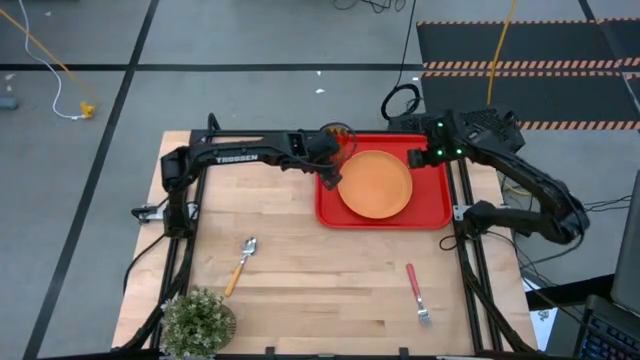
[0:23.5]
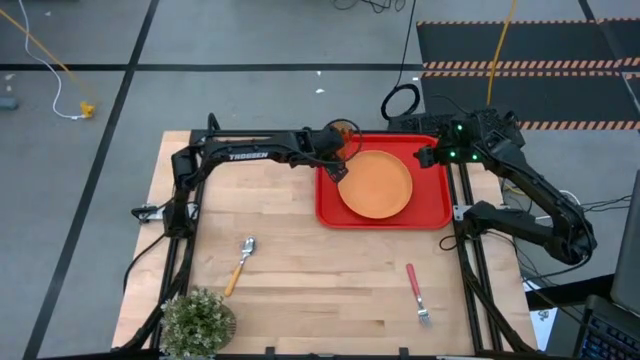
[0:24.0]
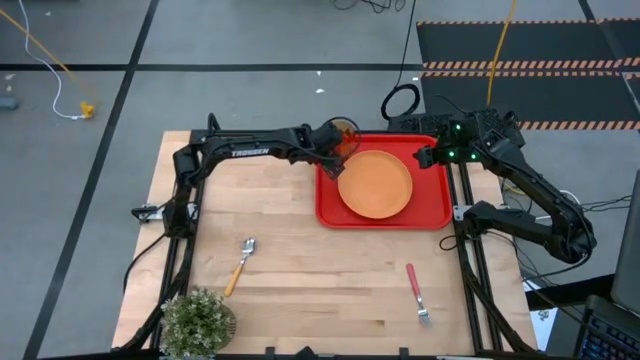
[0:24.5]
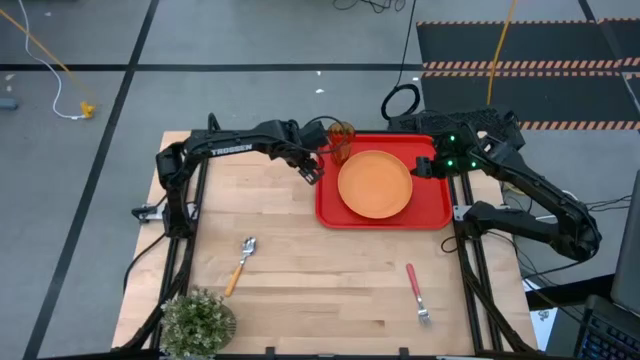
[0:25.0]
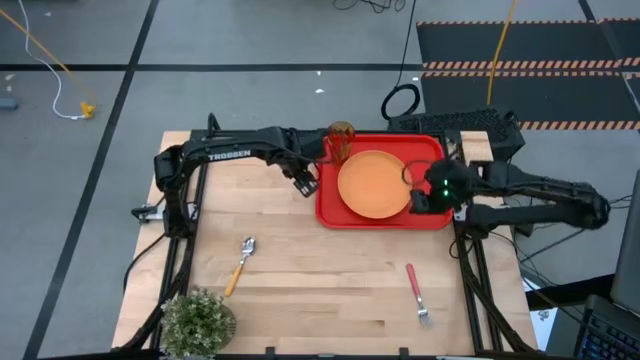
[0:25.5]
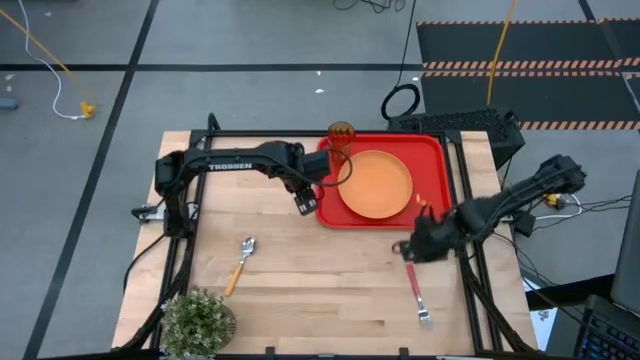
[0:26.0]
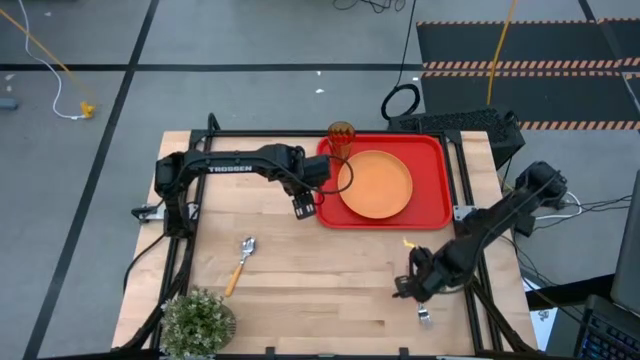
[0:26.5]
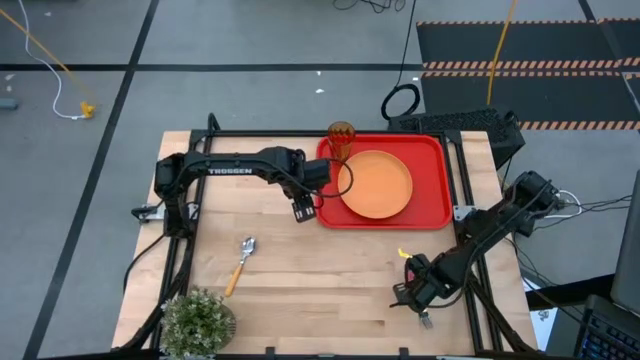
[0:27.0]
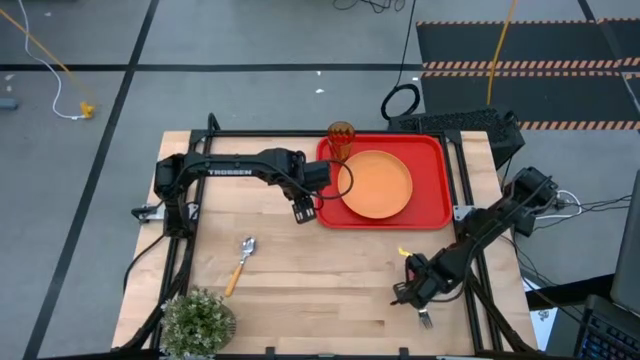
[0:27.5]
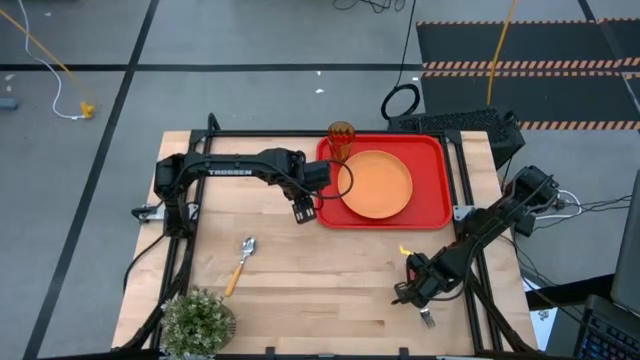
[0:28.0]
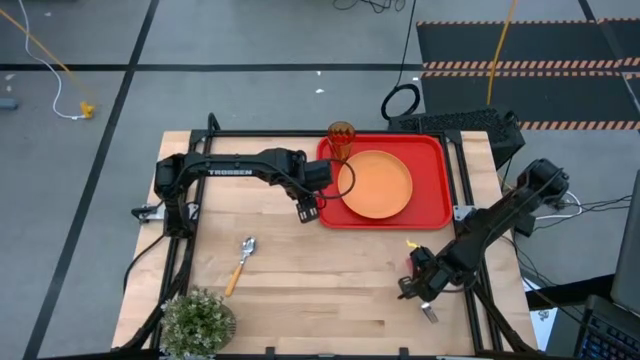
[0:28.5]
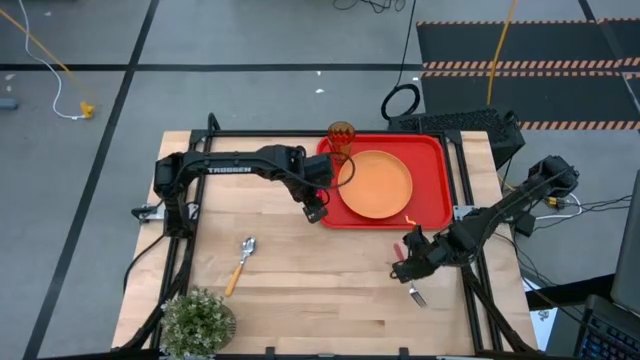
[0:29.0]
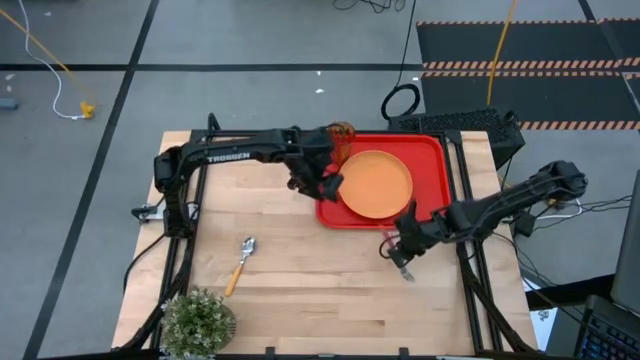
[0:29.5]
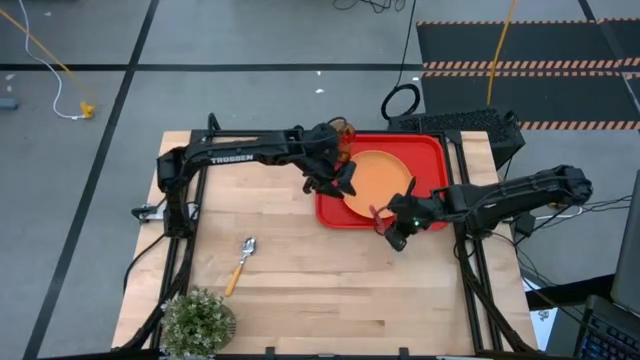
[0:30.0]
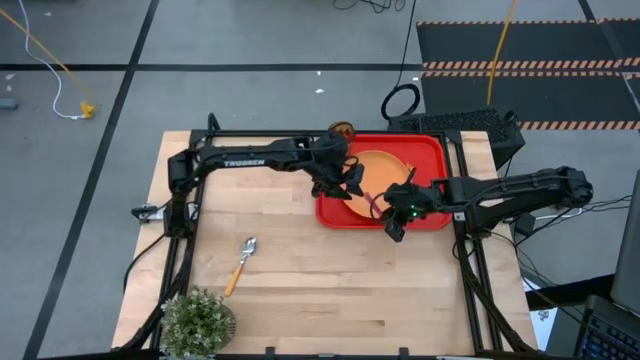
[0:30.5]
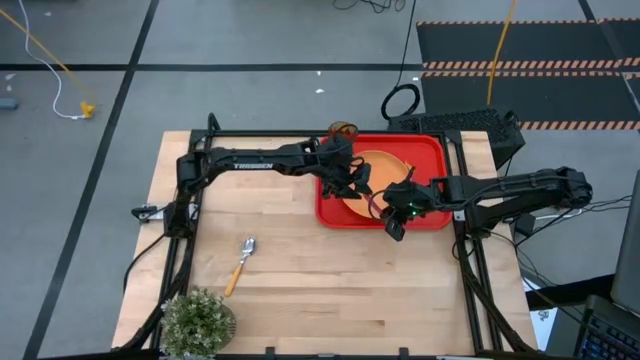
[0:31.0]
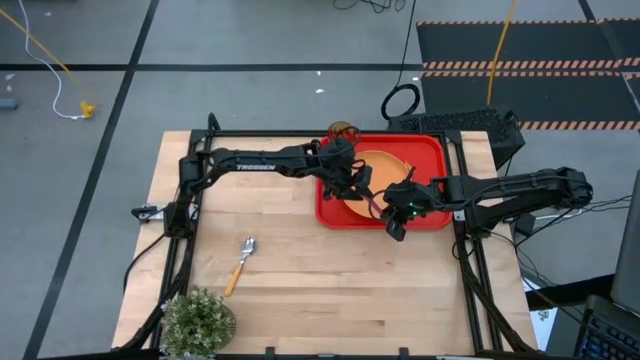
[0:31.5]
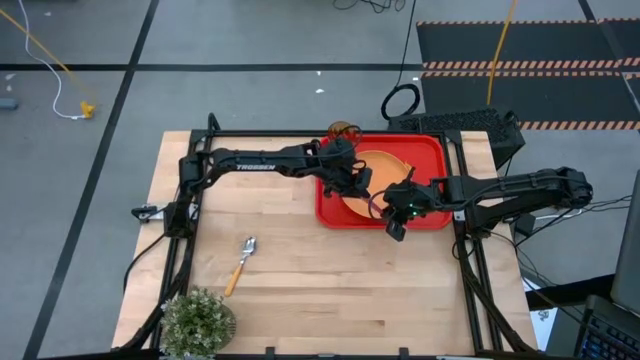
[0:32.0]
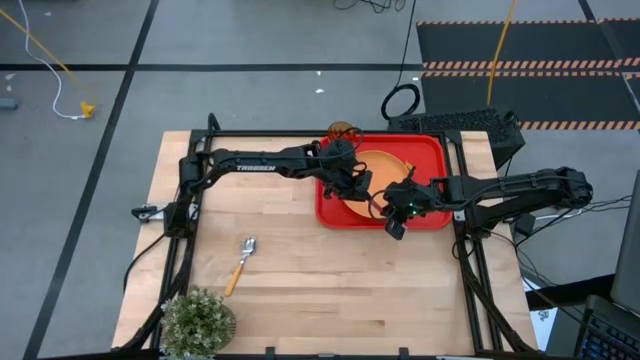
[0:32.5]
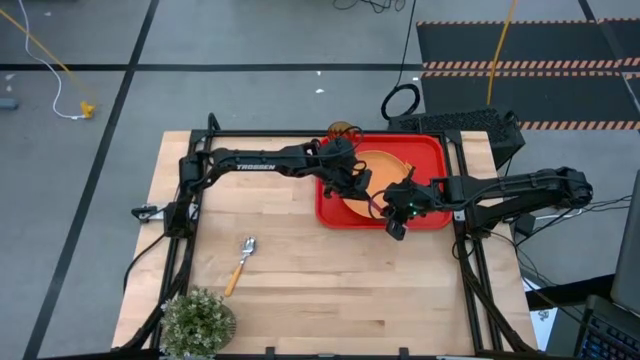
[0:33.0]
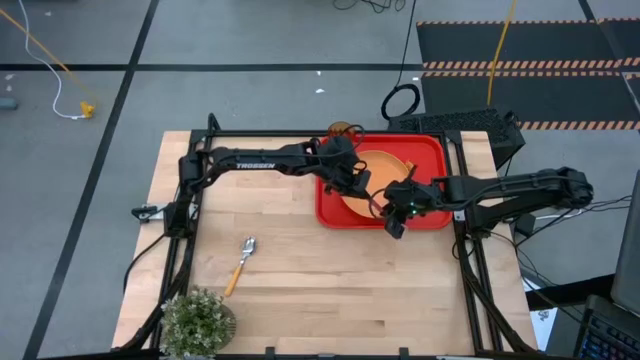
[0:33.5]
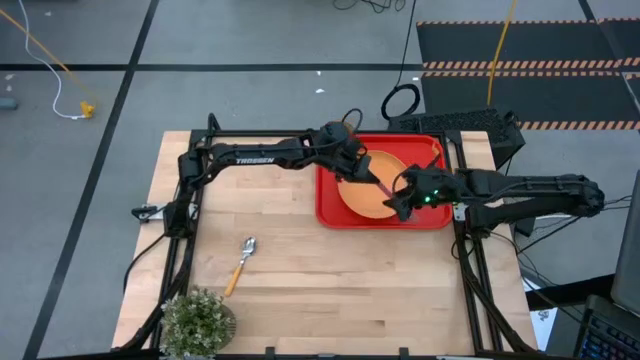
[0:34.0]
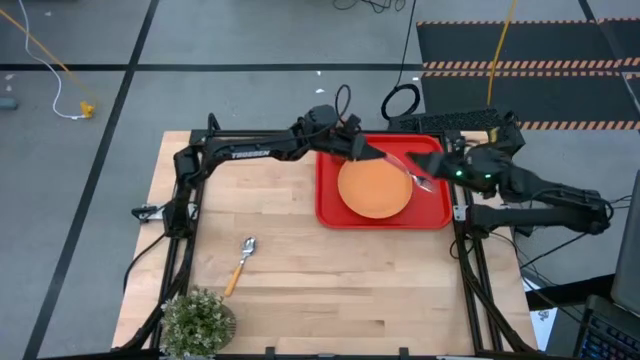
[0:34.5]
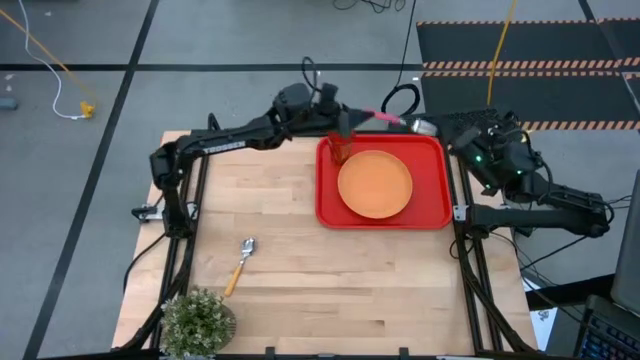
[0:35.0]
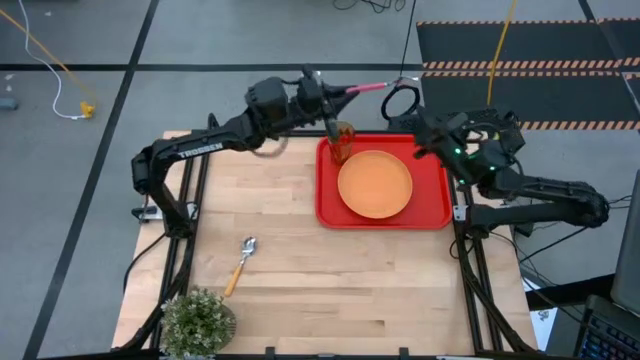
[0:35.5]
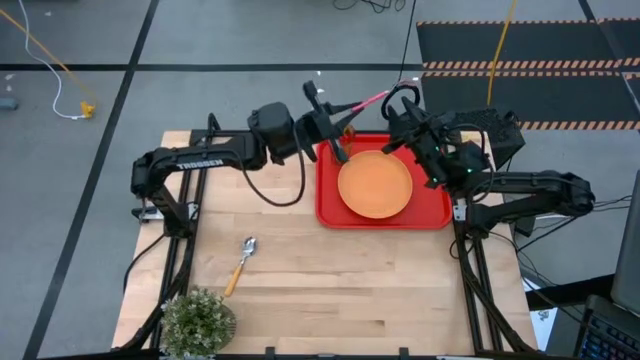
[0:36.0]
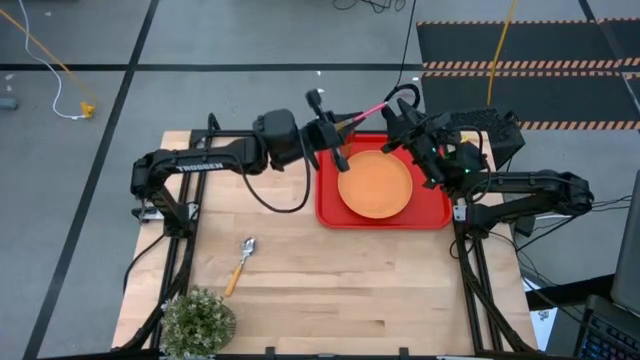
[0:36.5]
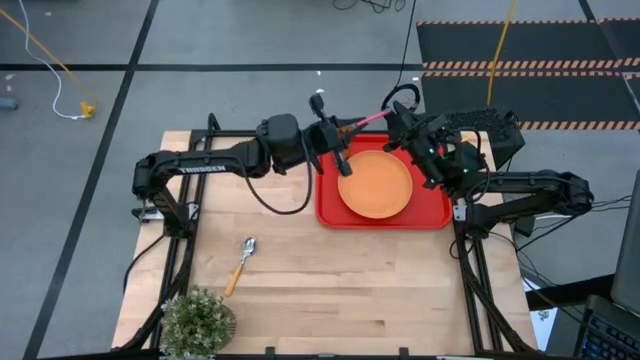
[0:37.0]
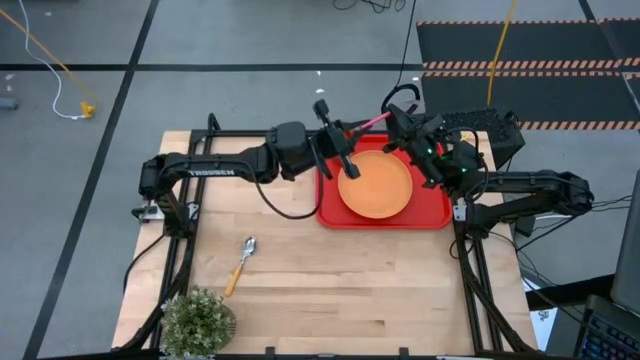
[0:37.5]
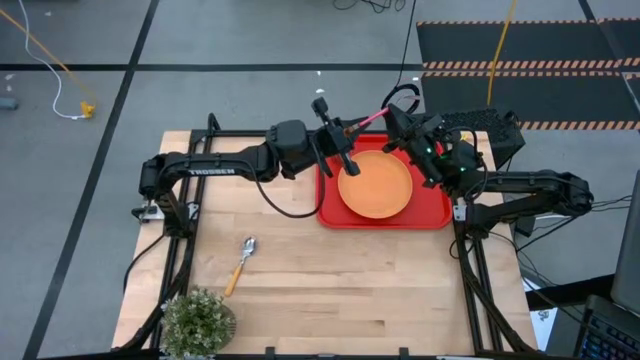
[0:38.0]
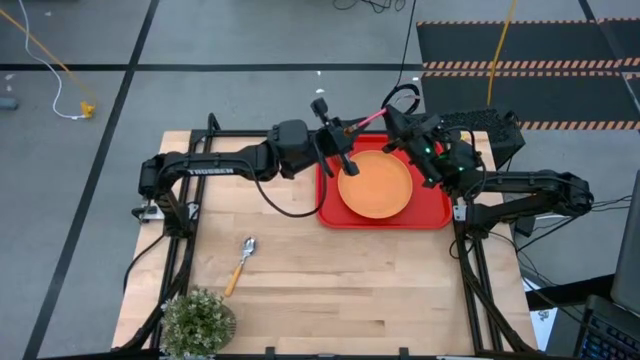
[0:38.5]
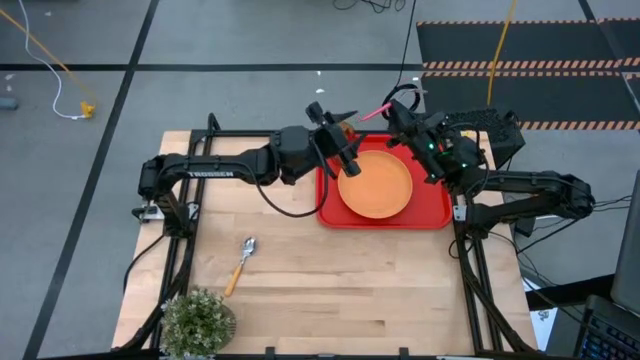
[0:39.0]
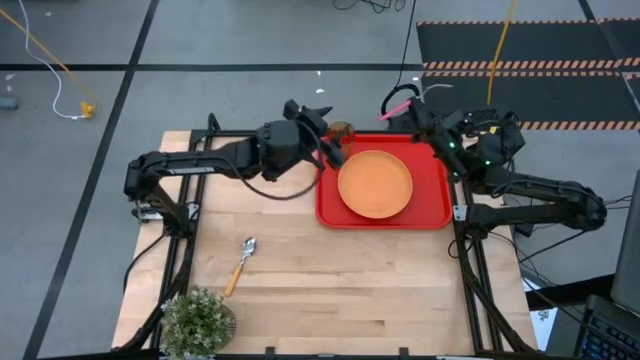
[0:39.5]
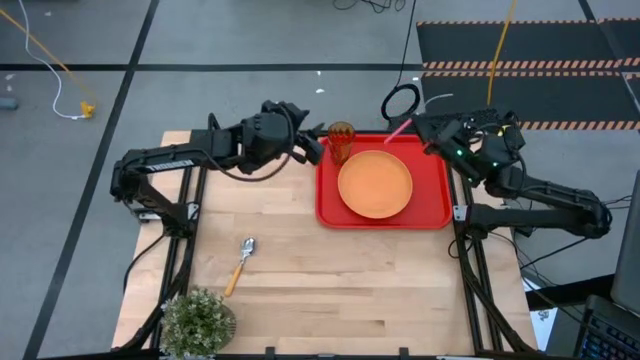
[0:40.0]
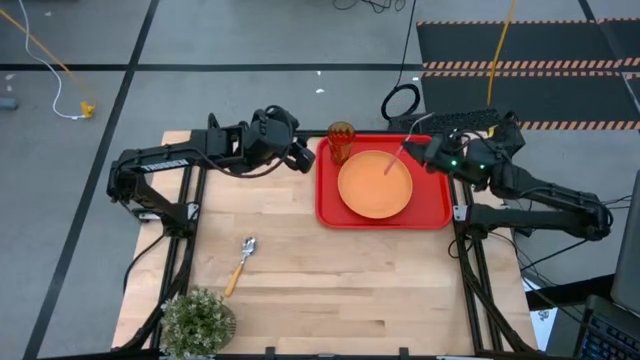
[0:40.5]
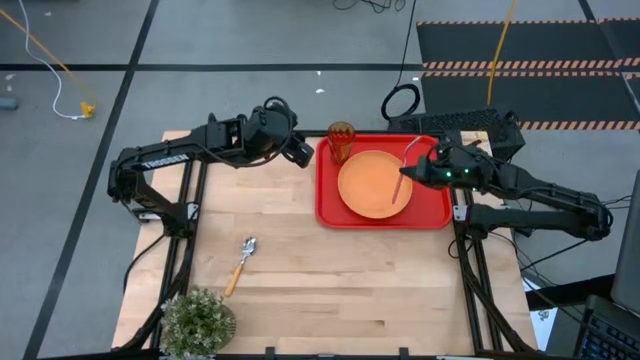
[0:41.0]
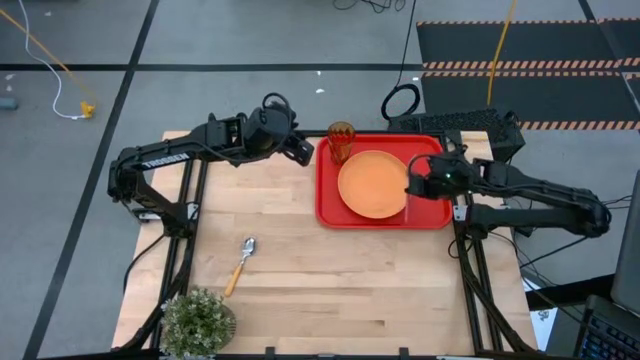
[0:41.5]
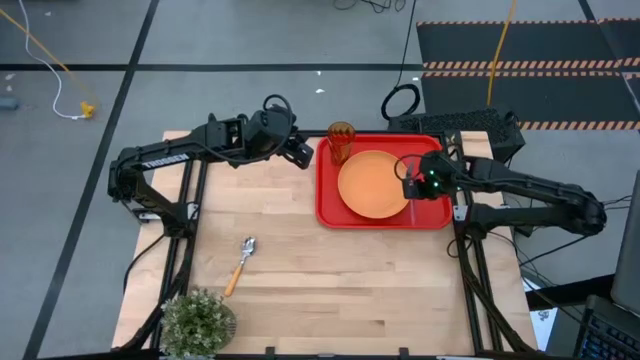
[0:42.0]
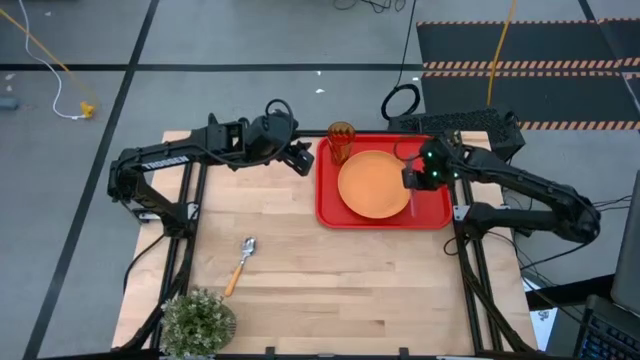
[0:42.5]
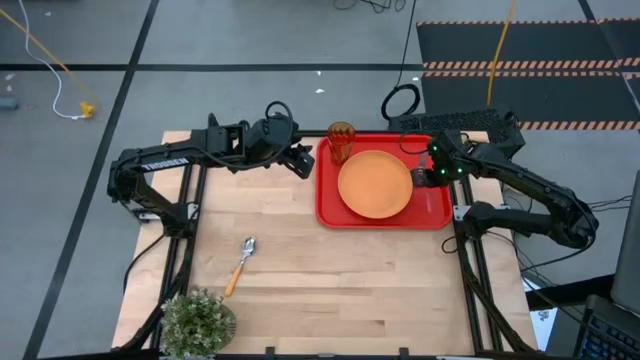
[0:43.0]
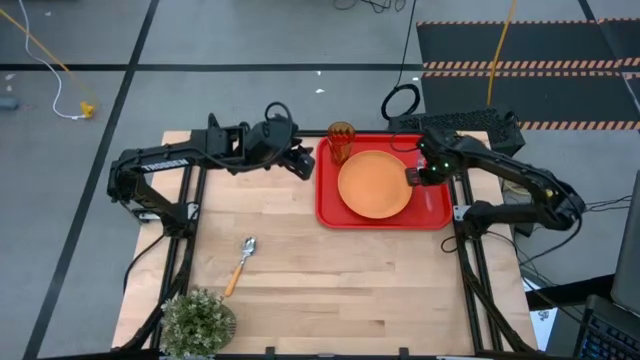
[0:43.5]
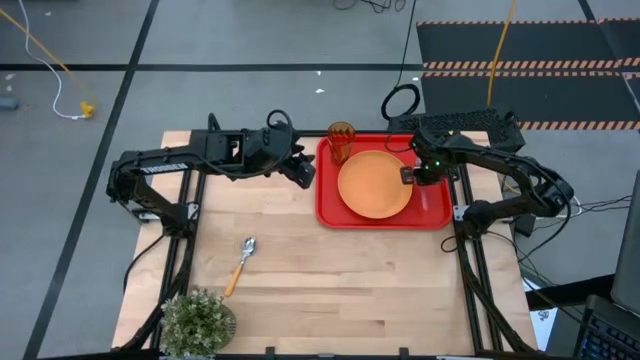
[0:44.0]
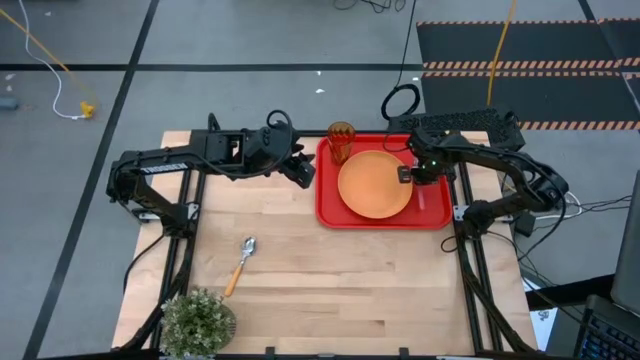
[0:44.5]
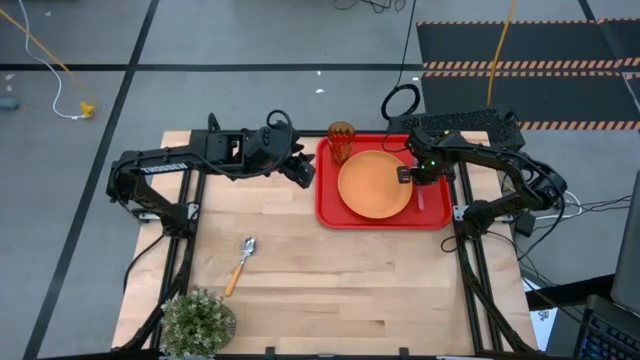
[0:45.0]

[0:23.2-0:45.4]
Task: Pick and place plate/cup/fork/spoon on tray
Put the pink fork on the red tray to the right side of the orange plate
